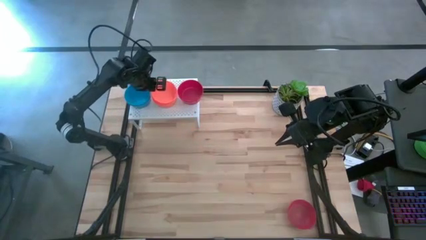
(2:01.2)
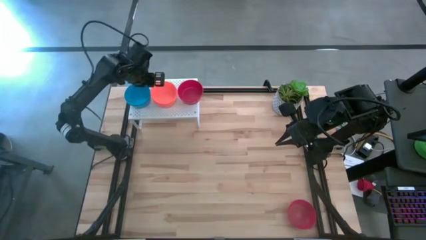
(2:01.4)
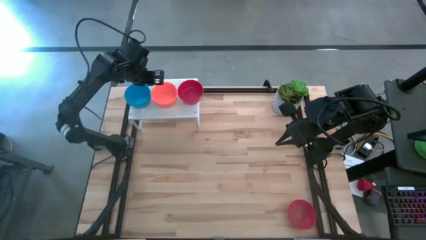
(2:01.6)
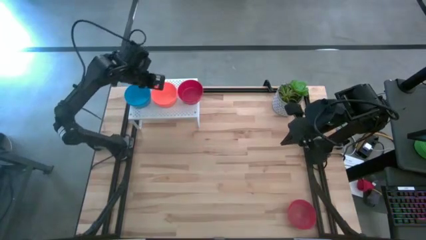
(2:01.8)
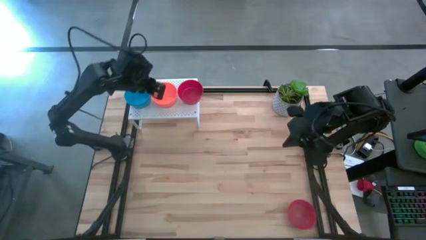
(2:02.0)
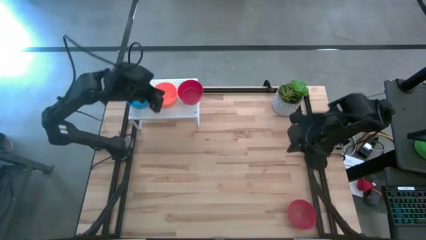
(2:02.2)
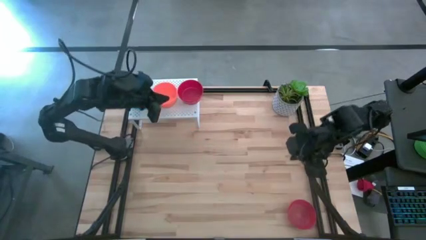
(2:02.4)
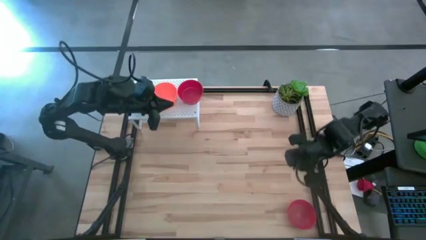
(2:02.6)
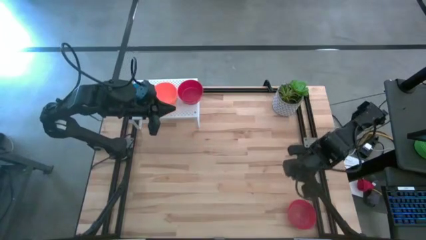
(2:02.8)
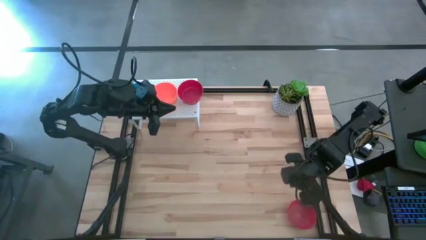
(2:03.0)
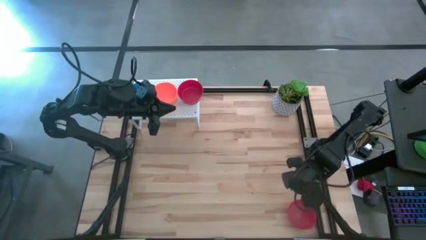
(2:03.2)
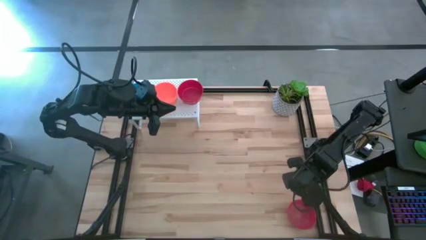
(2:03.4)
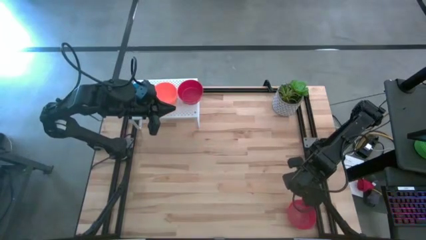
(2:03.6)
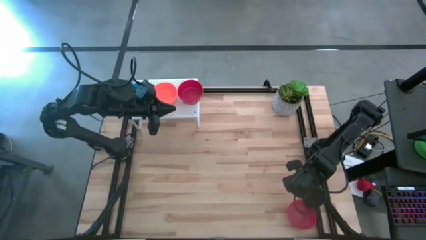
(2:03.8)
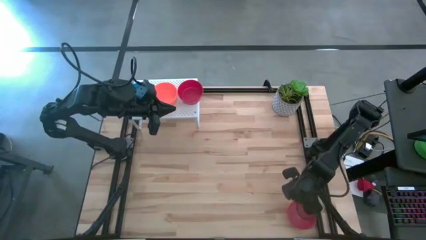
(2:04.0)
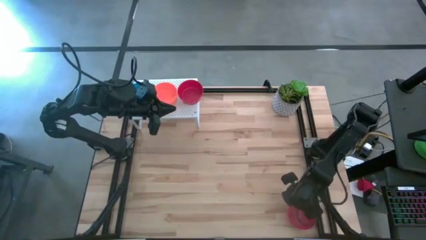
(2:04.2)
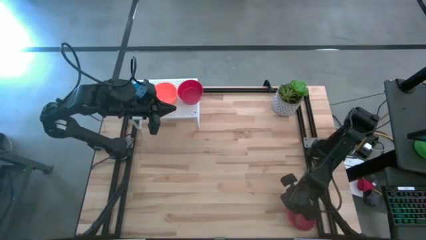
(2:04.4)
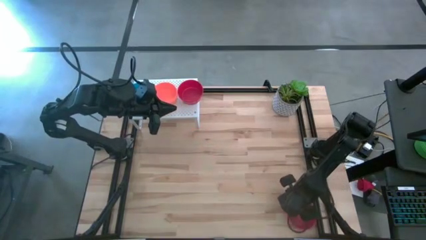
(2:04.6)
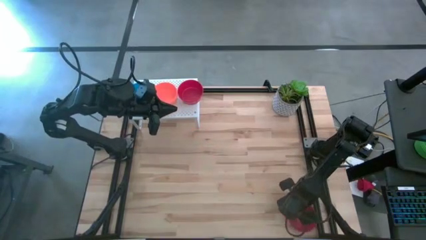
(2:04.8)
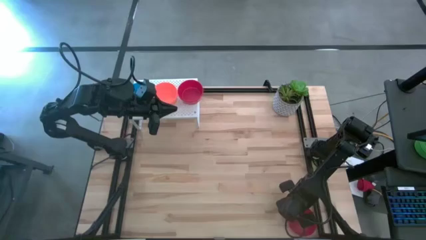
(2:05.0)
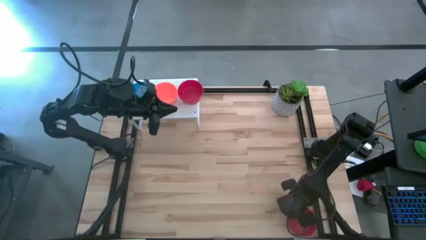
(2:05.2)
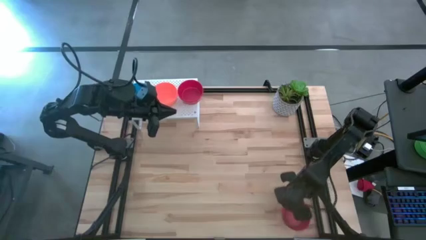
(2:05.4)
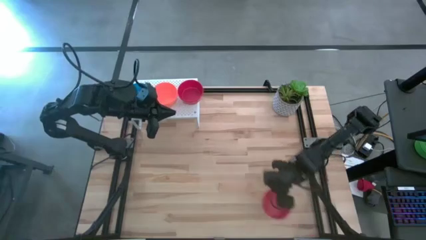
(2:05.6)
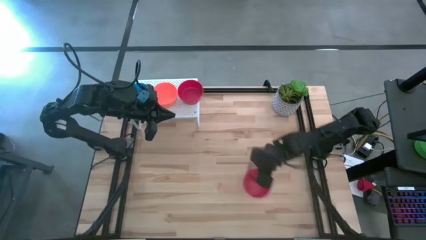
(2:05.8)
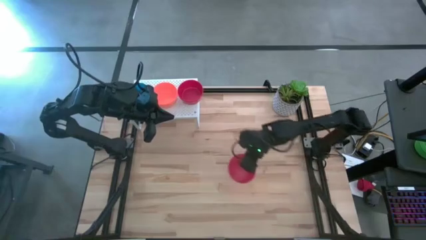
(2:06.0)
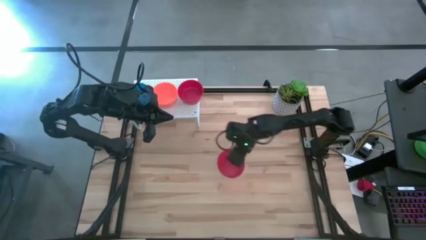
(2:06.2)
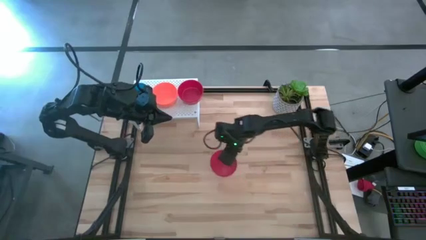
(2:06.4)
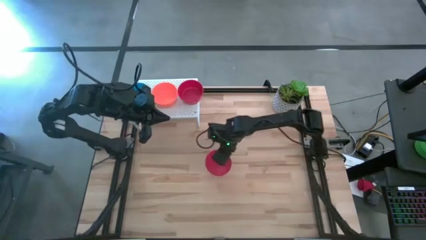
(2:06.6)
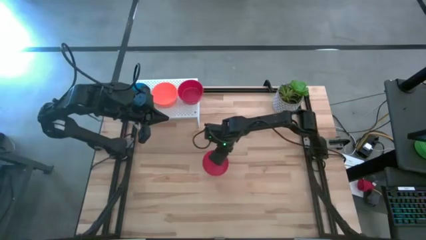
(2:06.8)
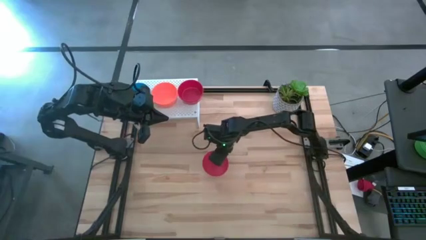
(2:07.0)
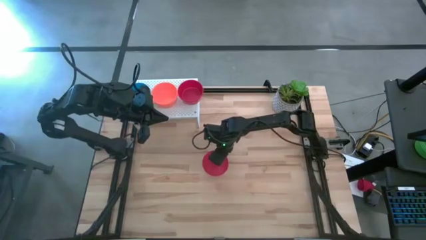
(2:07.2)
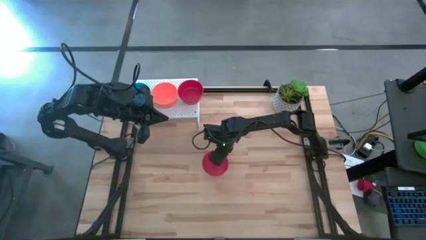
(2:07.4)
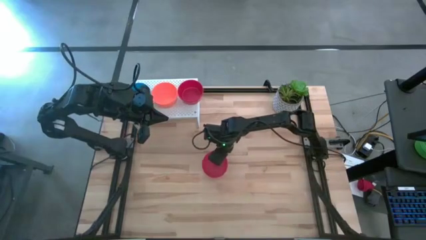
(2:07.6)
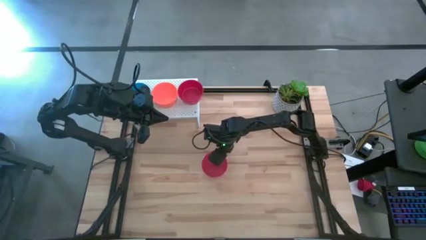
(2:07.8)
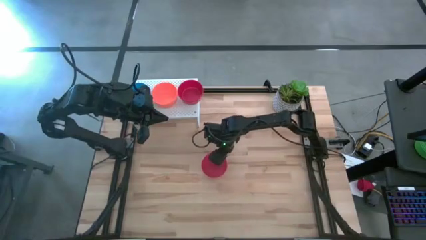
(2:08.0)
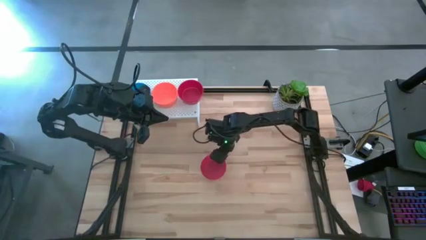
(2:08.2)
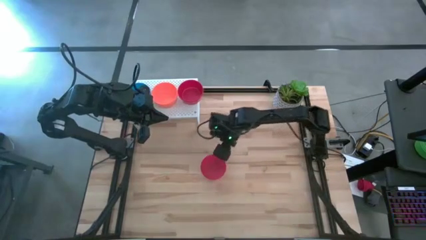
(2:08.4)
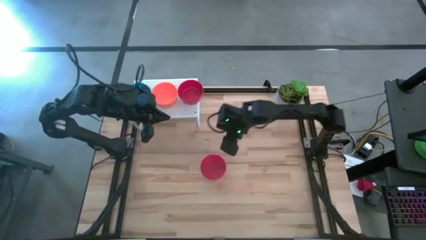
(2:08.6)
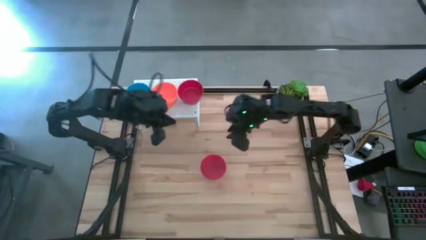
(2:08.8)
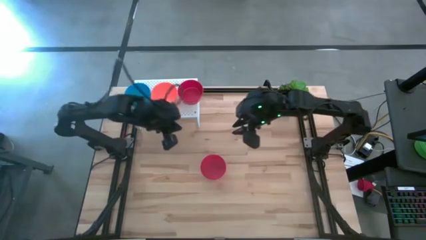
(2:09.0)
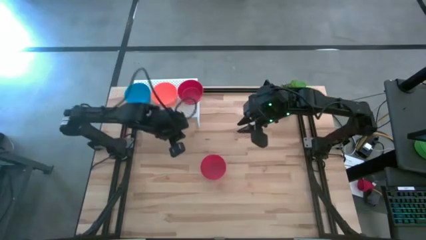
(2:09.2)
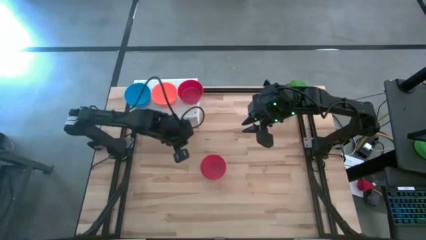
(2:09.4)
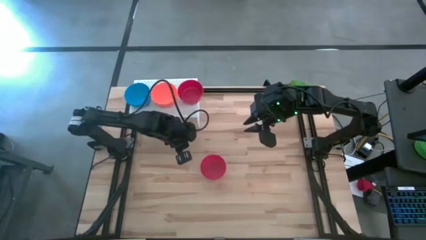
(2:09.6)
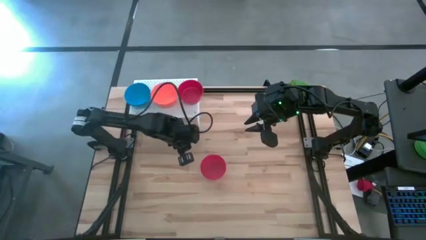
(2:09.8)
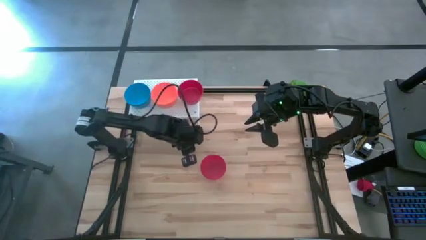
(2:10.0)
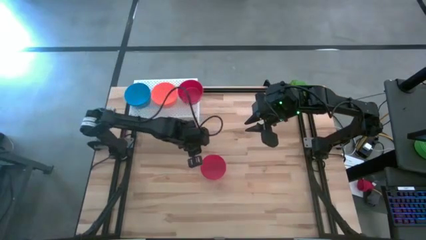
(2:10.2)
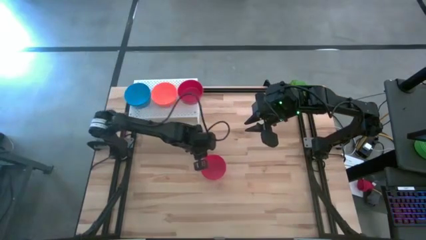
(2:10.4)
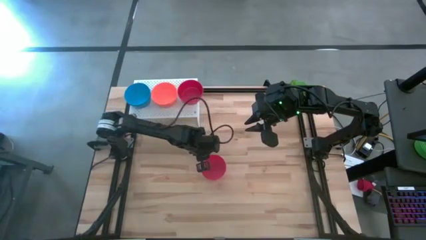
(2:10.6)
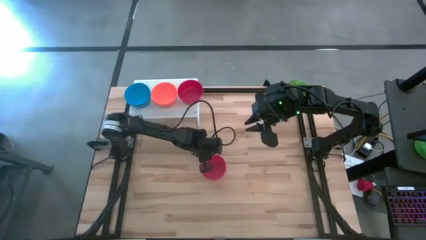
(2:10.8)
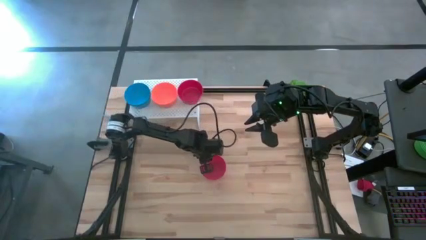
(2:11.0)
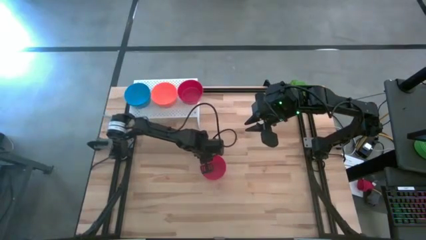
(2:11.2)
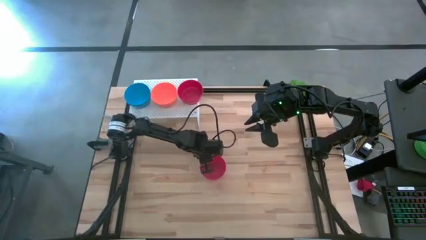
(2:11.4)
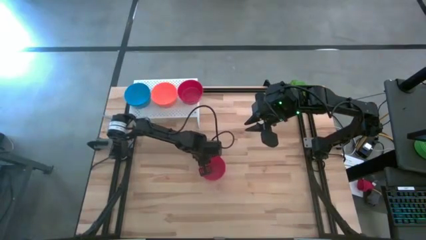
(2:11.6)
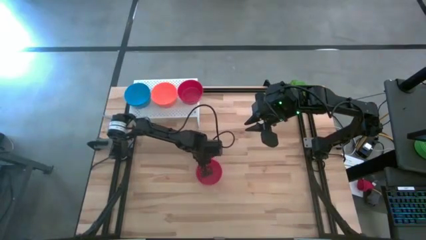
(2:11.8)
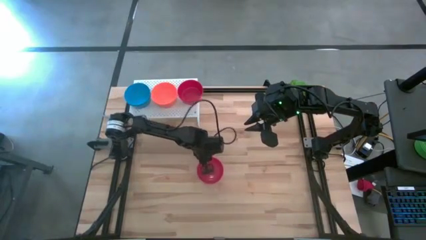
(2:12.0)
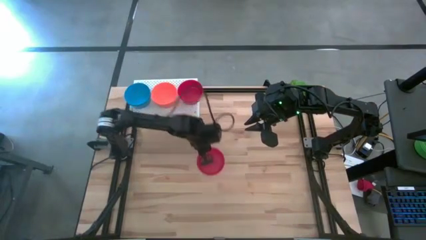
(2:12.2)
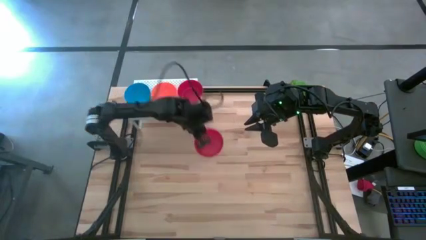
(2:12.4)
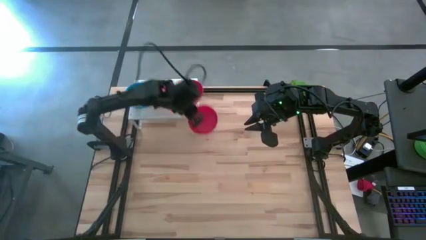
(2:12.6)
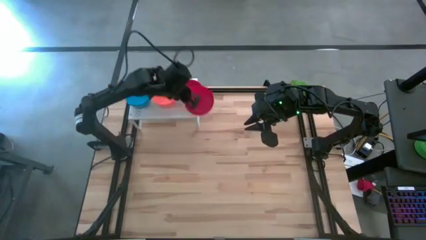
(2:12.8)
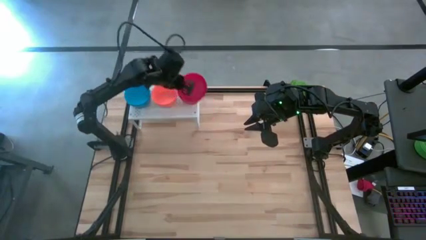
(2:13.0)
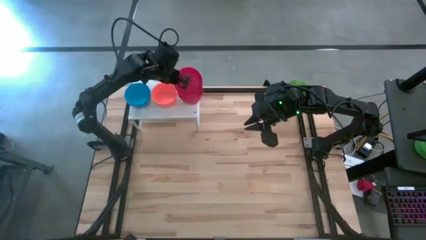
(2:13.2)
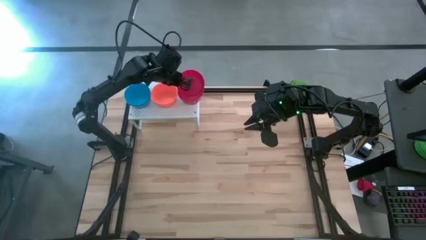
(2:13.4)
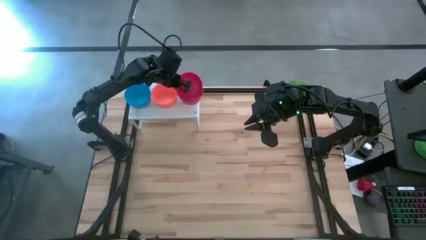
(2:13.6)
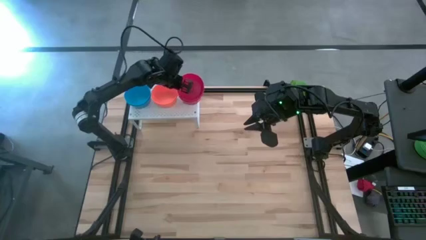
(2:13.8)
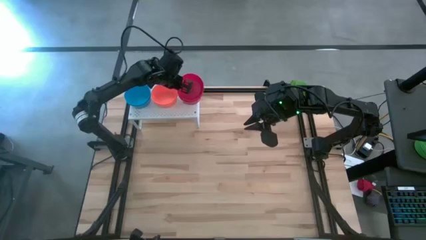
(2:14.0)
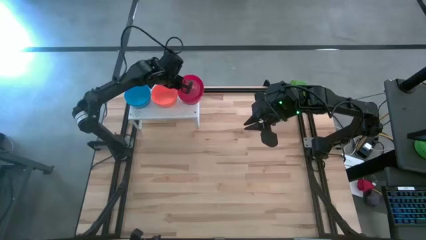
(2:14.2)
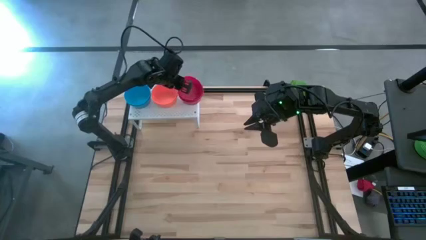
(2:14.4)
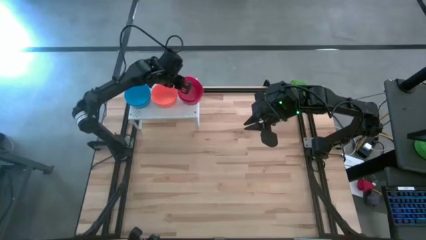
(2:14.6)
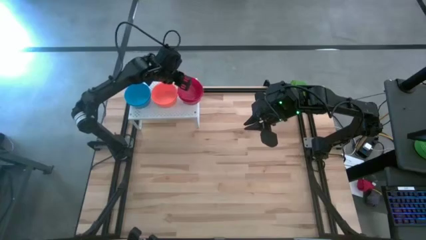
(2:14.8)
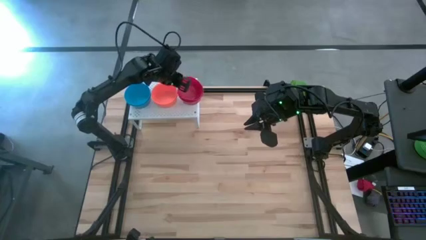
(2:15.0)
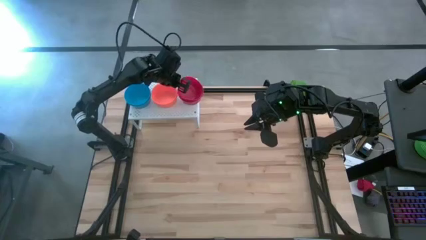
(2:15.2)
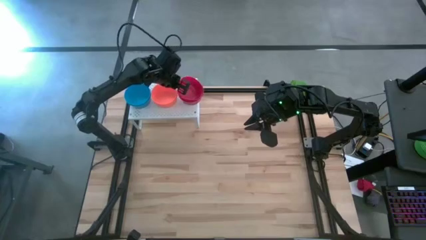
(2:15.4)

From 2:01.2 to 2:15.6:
Task: Pick & Place Mini bowls
Stack the red bowl on top of the red bowl on the shelf
